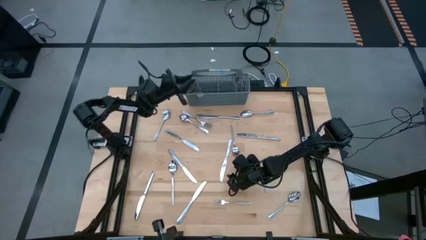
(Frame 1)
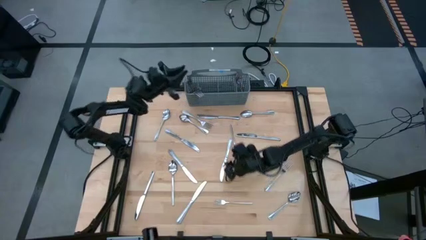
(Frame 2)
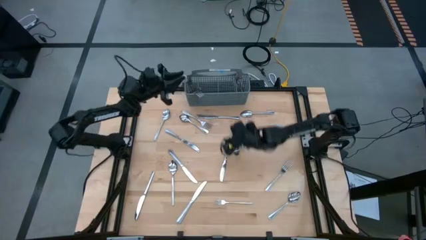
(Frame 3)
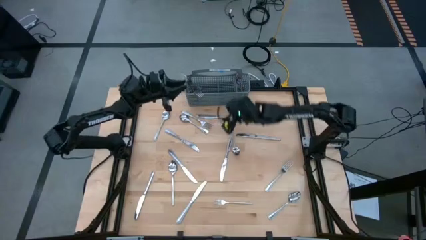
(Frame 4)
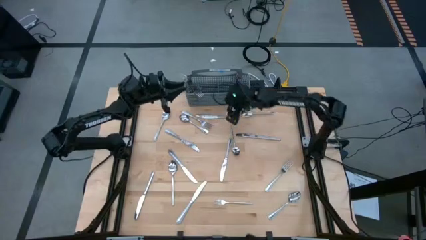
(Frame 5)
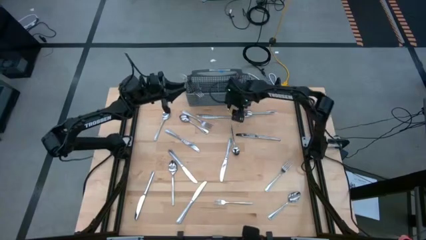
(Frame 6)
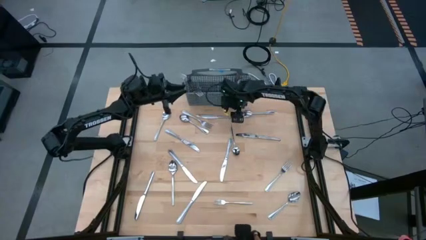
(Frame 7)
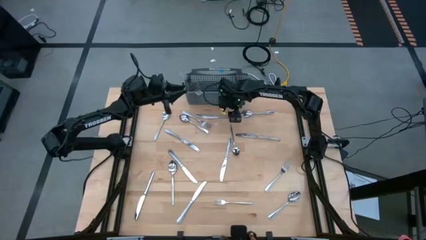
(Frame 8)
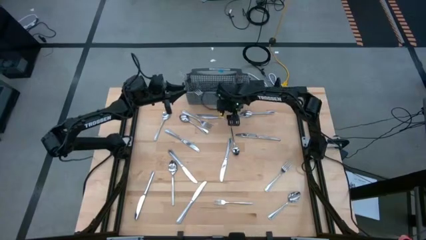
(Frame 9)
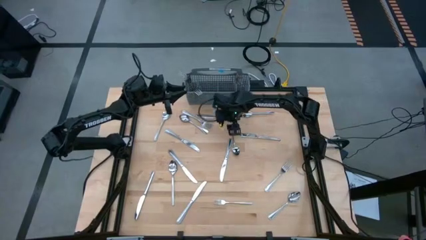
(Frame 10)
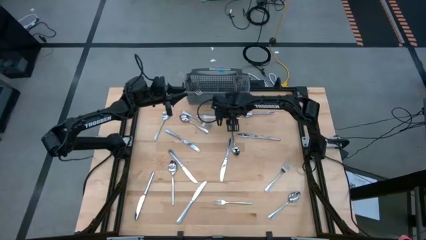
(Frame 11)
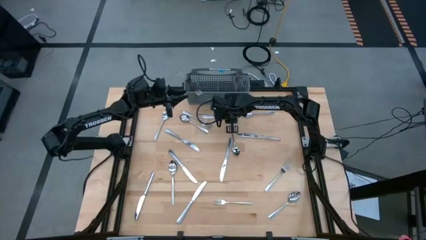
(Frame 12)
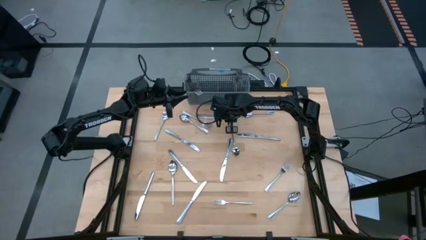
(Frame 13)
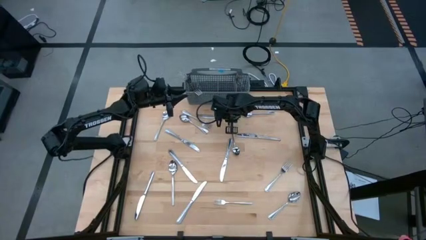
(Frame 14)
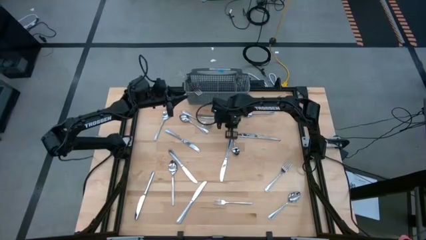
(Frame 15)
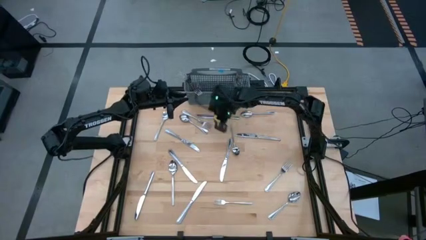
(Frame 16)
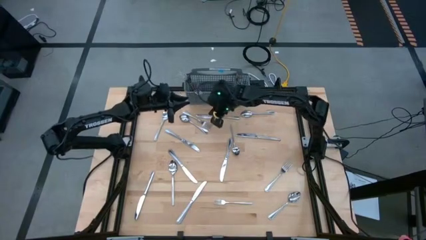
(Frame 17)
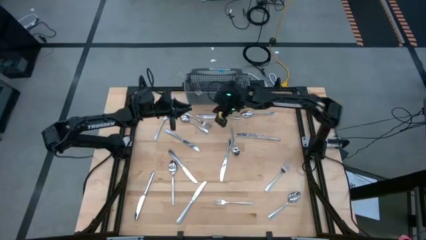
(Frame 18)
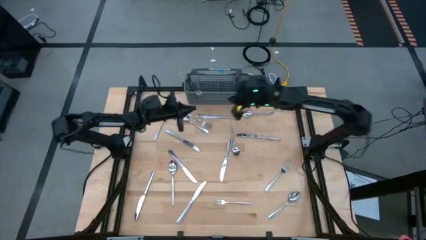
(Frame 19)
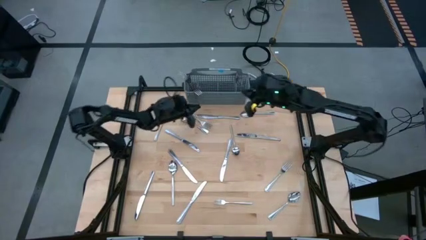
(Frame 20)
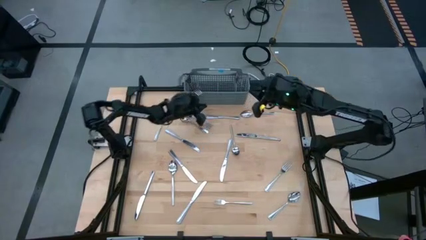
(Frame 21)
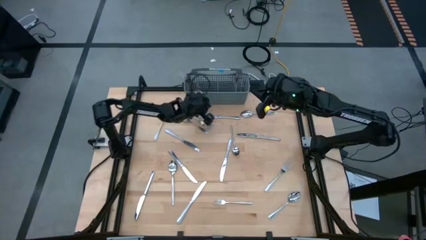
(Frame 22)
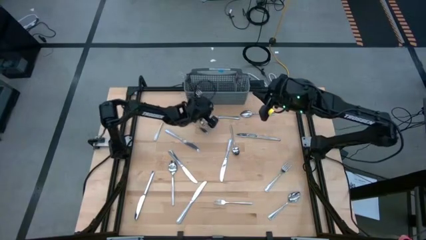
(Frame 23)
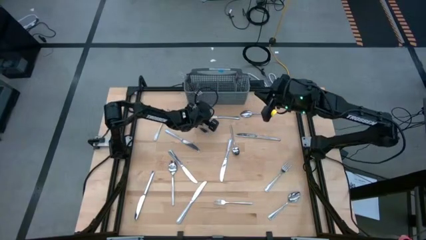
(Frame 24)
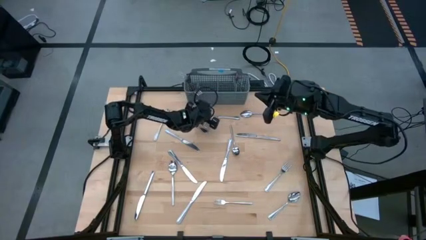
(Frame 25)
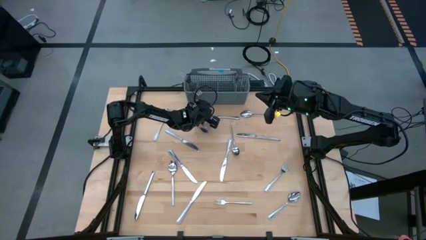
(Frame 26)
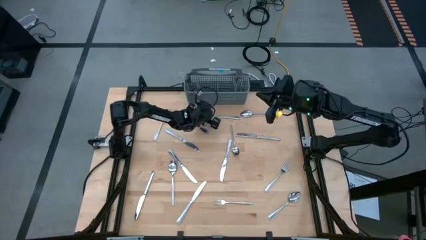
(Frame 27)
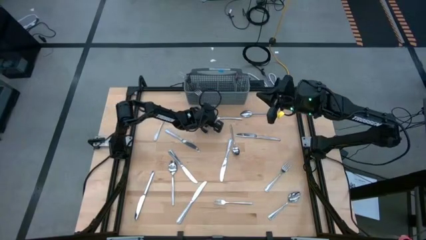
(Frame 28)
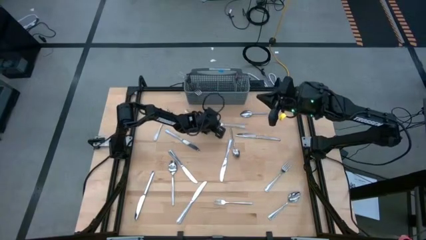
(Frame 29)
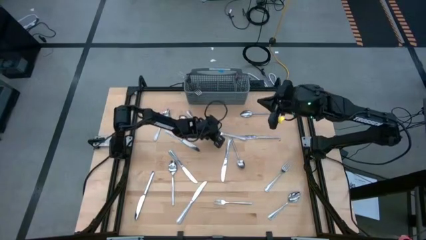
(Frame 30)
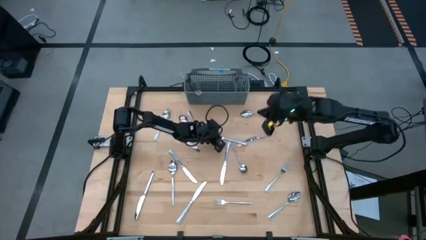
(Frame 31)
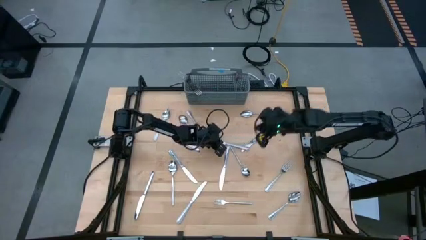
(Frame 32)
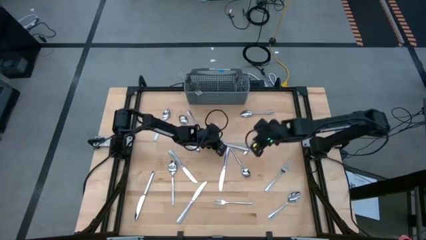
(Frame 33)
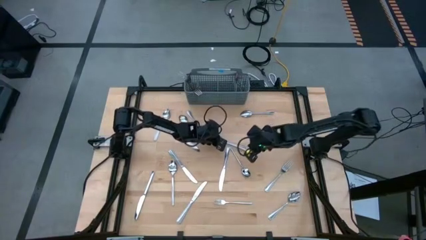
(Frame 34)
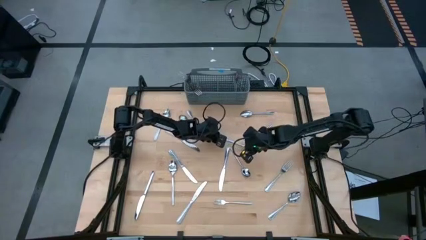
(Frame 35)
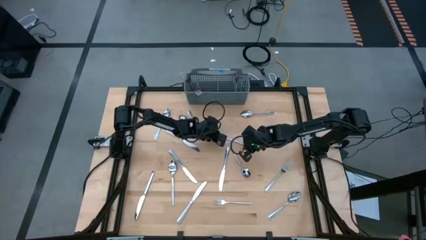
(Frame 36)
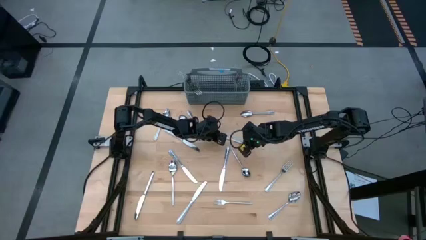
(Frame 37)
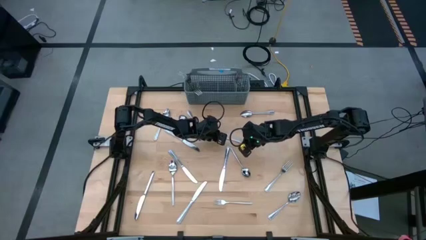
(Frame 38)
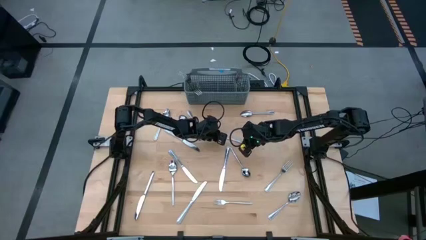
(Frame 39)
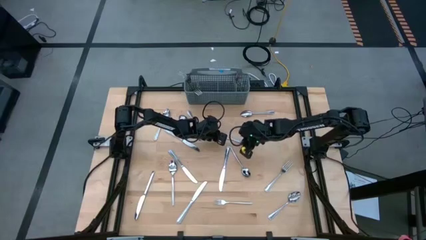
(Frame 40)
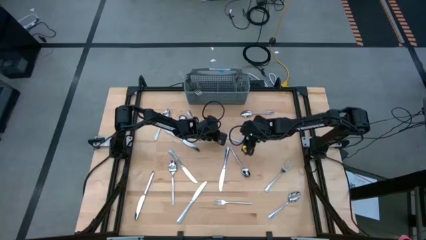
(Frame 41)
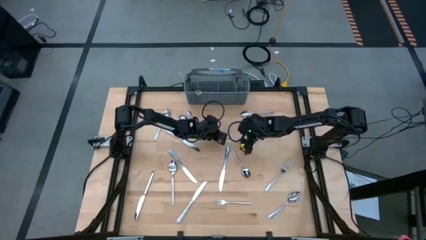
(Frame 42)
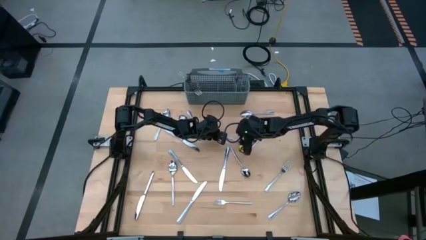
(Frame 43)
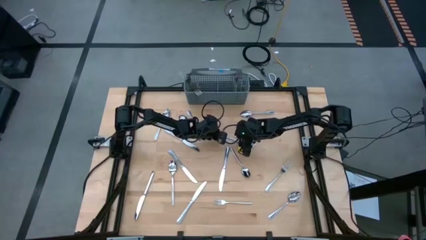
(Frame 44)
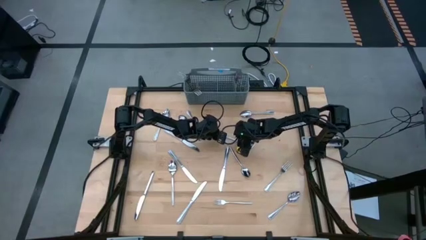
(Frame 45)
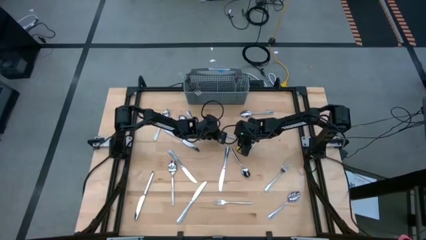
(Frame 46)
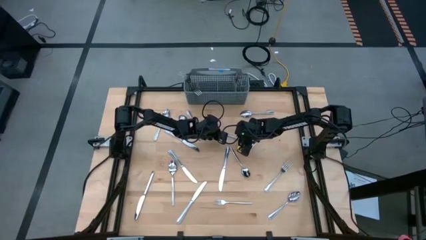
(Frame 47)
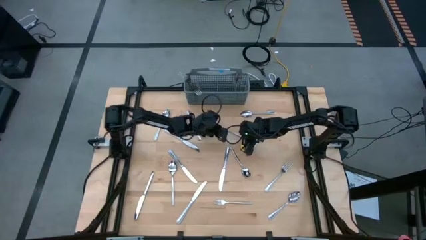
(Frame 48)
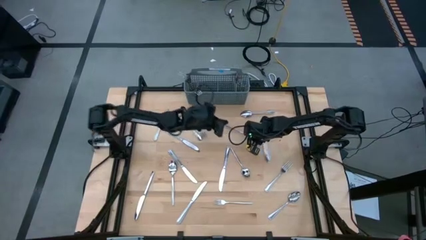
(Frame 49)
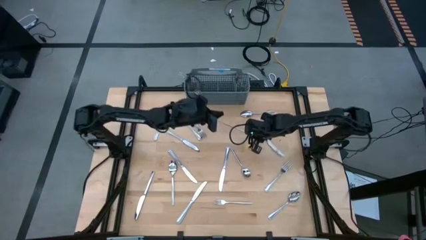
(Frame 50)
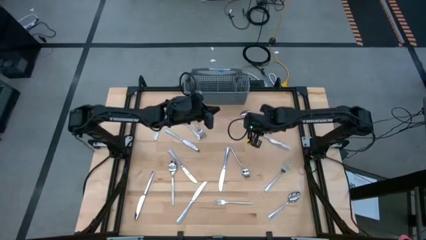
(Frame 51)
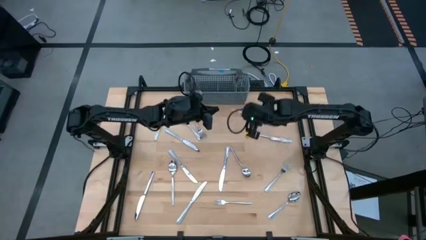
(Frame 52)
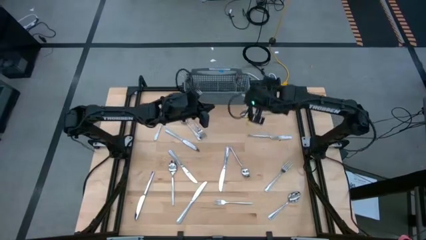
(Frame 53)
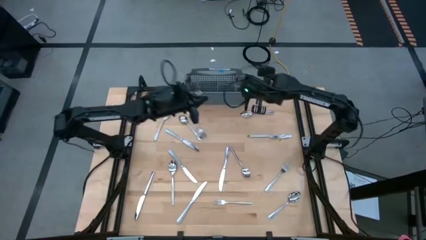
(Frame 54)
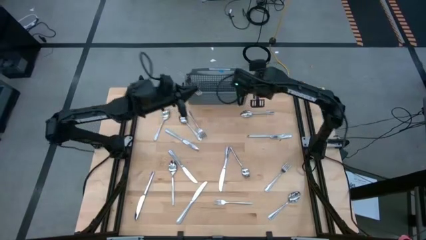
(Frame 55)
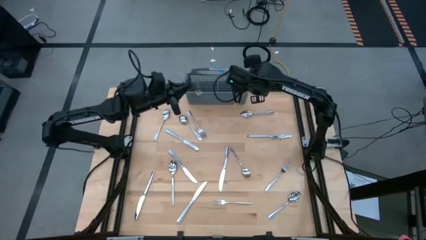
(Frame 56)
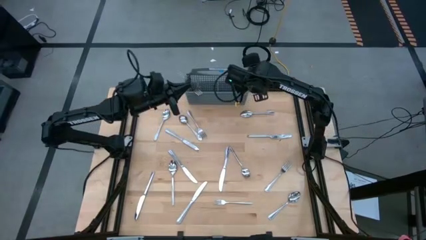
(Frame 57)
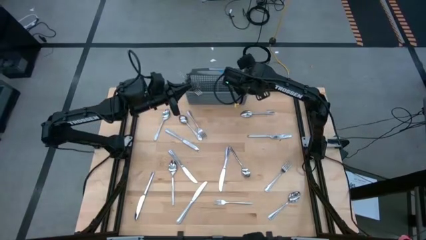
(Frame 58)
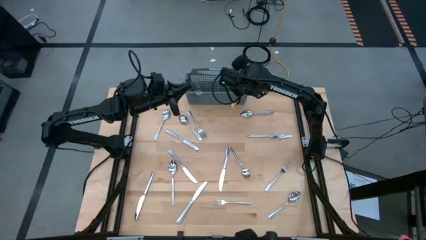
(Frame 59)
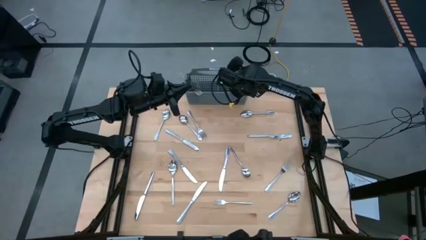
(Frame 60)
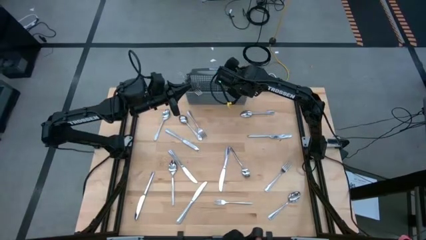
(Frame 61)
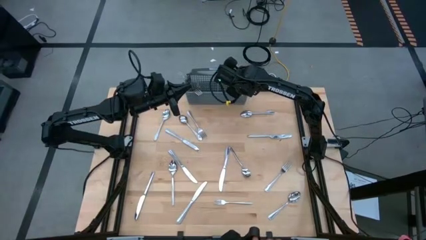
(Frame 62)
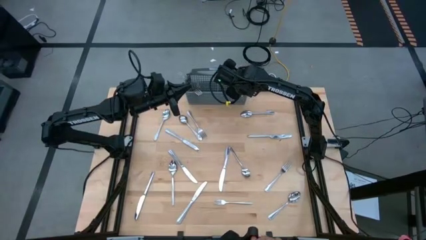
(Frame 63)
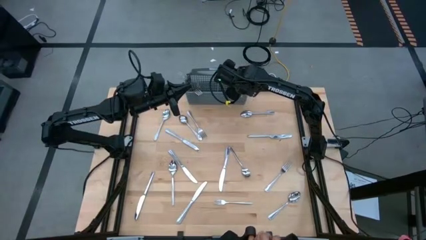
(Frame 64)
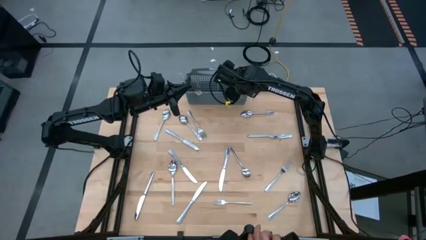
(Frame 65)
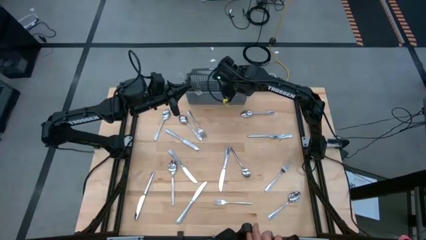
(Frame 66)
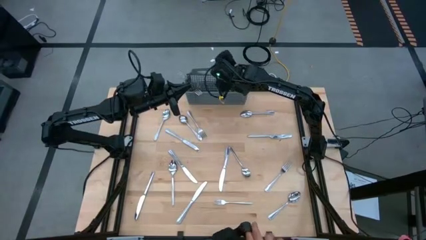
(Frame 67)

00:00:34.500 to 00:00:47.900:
Task: Sort silverware
Put the silver table knife into the silverware organizer

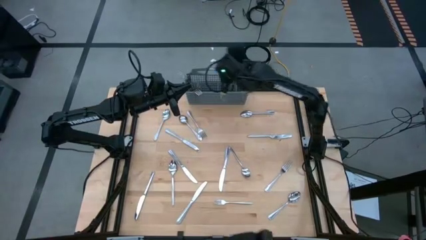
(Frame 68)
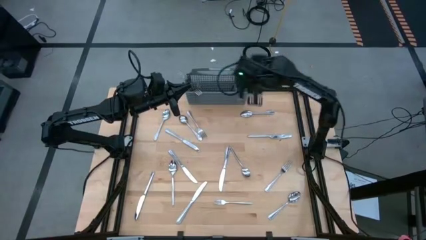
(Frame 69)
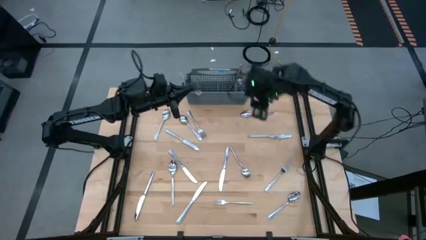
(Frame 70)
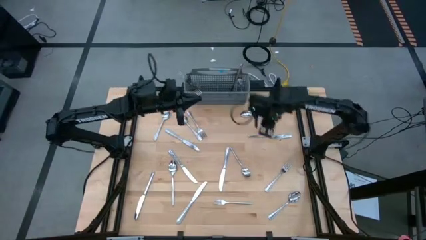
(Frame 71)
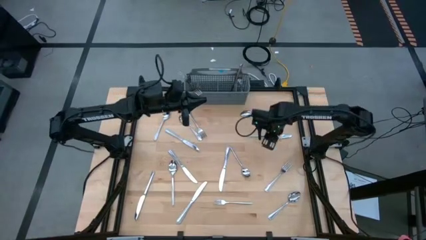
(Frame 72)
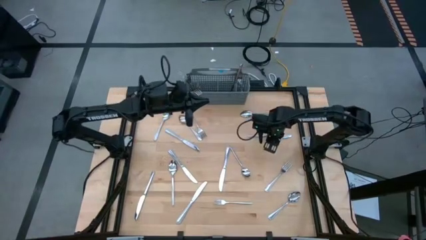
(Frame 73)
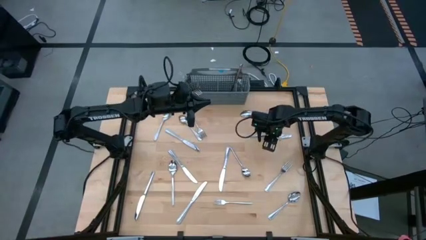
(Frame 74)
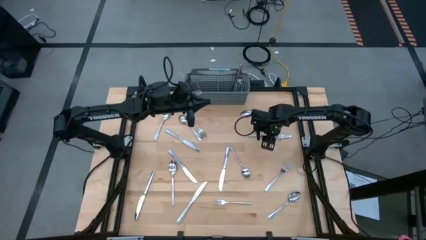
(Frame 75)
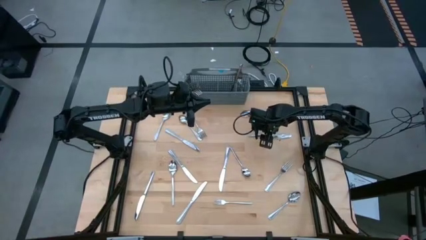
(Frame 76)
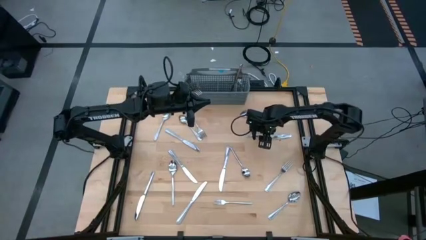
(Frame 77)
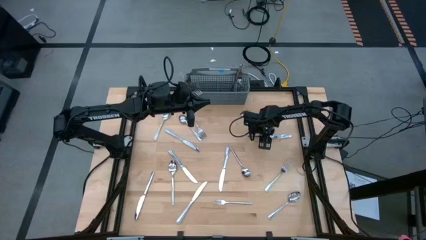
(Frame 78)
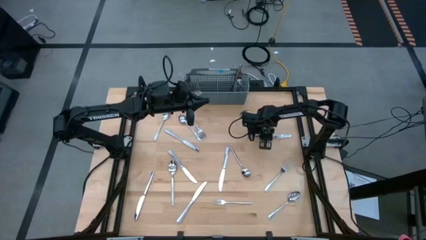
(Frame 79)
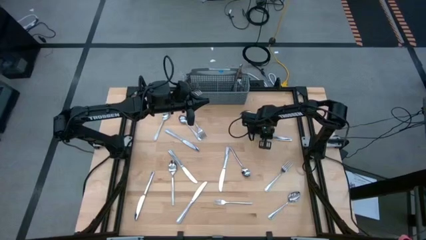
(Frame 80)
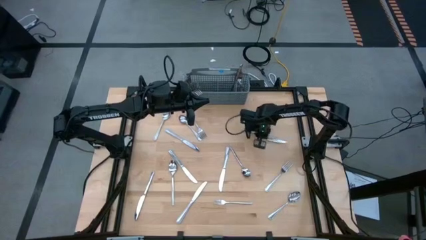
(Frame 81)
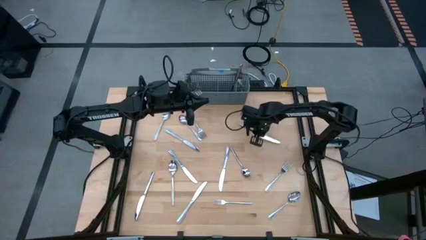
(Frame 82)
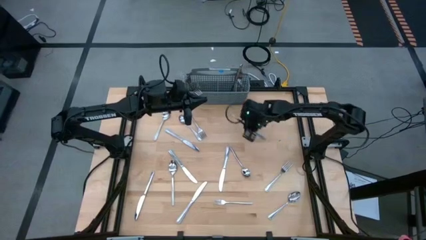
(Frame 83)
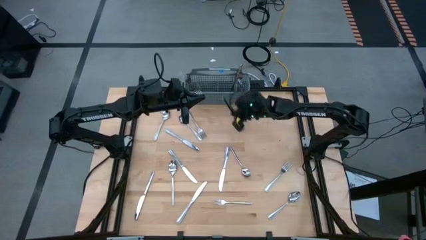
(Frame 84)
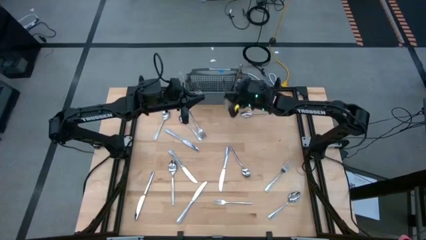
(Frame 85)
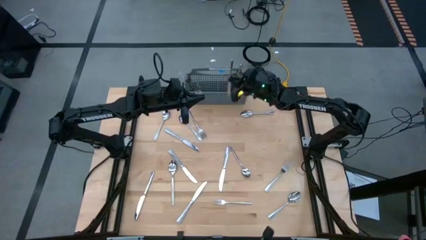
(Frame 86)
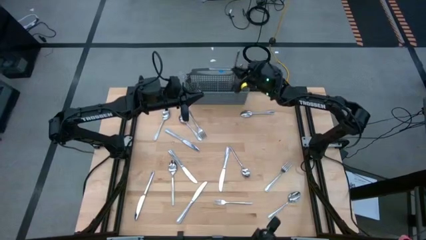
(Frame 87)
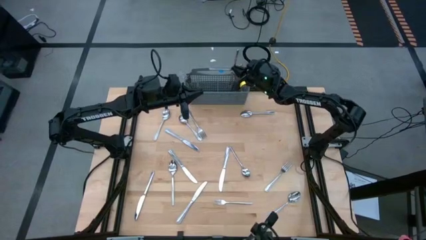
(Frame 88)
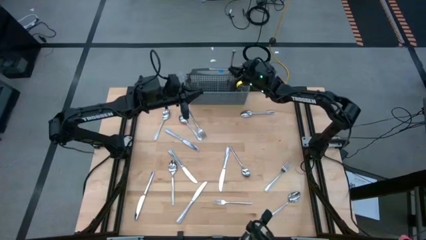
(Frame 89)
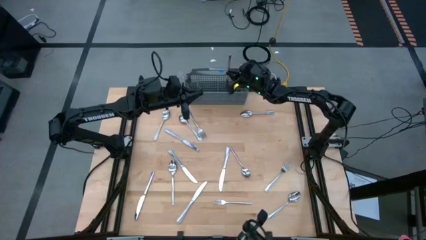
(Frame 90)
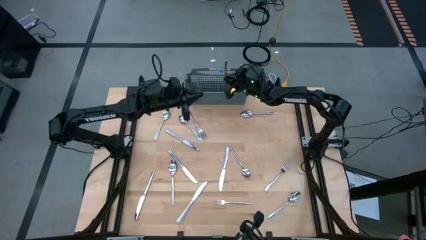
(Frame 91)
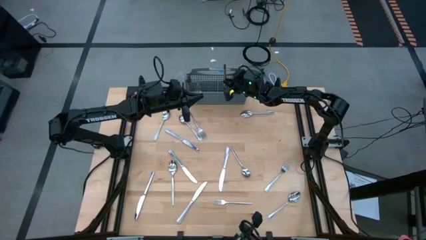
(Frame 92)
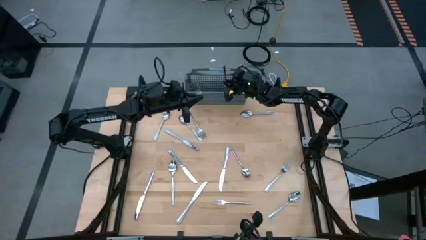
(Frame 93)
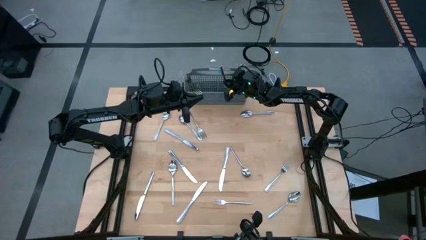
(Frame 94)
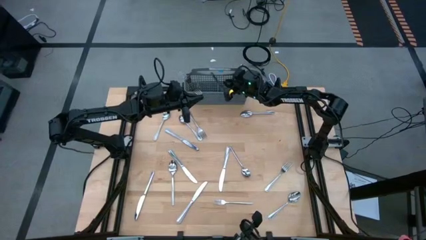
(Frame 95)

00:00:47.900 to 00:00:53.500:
Put the silver table knife into the silverware organizer
